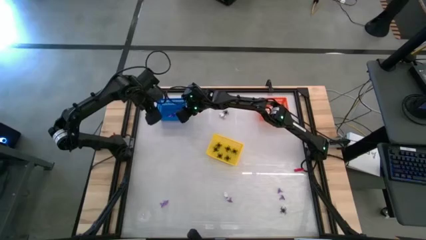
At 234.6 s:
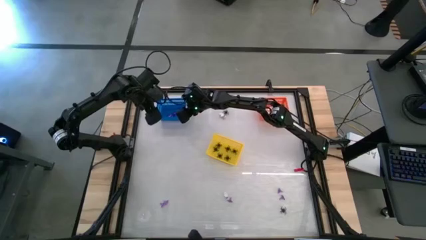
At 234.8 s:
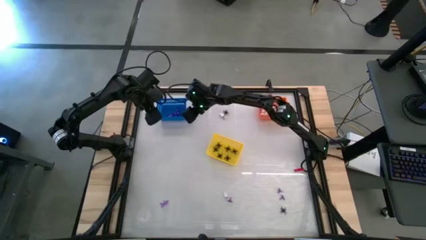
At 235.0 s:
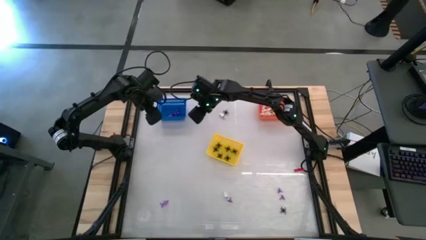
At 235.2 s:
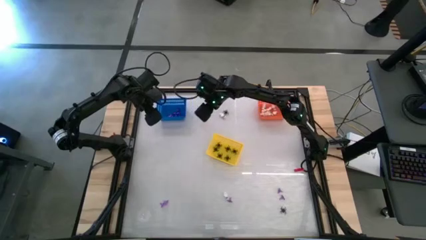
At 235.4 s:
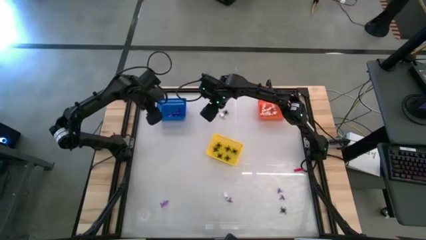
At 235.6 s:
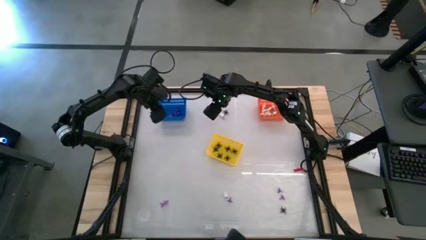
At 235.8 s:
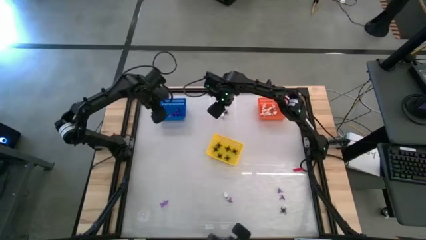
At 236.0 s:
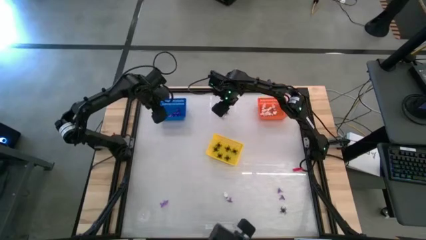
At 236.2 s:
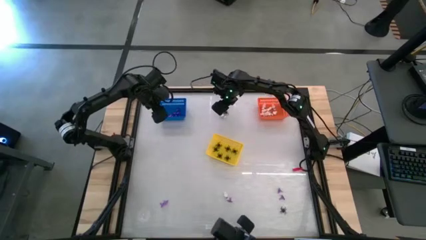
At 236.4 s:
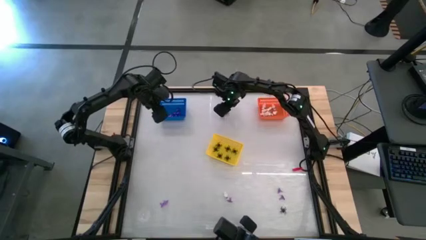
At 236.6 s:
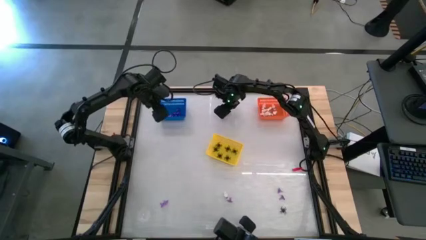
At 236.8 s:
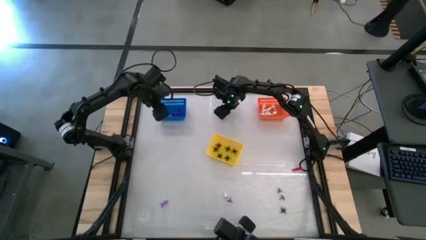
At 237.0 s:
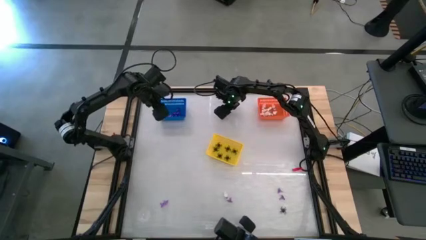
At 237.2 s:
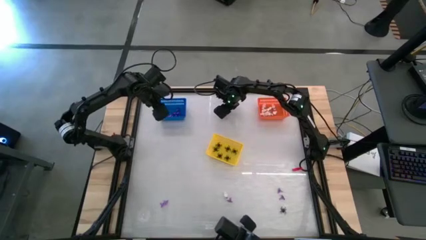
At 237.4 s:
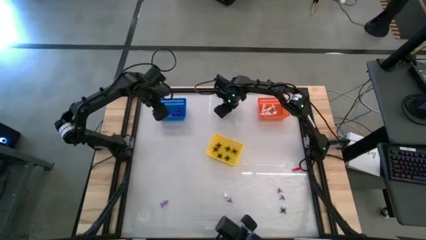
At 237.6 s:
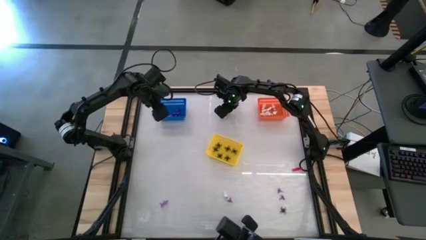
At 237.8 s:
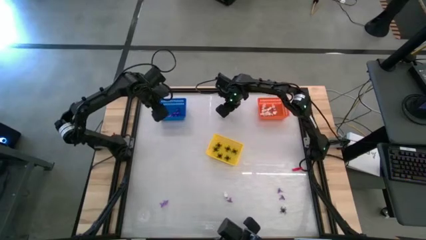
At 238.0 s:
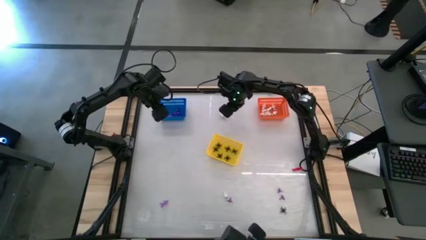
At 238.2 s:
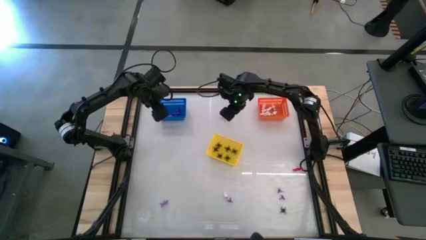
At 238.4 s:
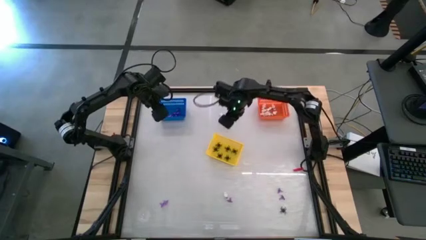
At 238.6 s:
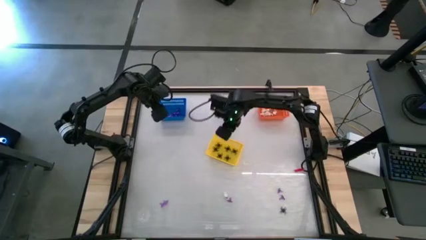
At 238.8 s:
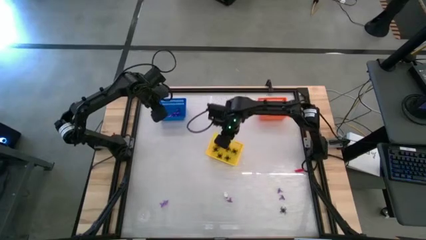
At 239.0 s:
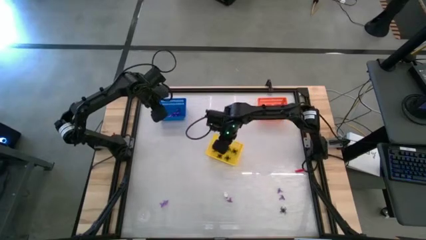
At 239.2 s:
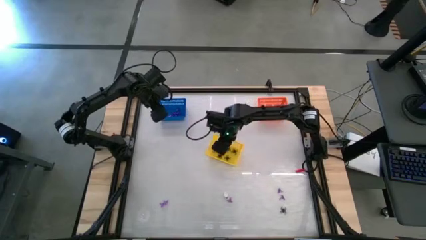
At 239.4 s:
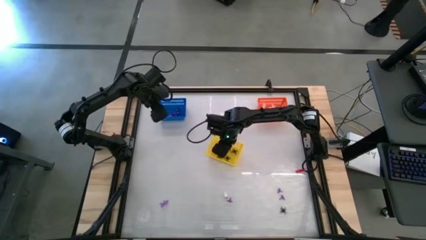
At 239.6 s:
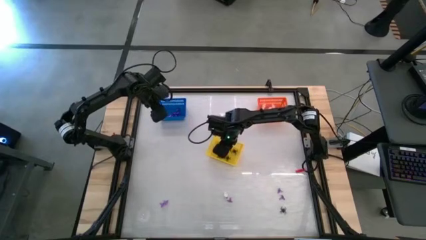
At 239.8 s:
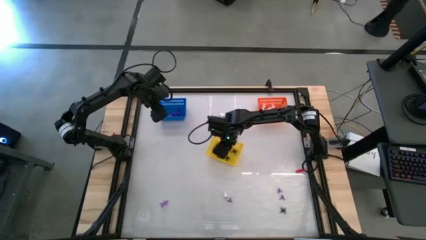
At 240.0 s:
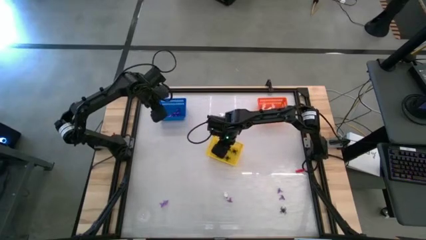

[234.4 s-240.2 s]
Task: Sort Halloween decoration
Put the black spider toy into the yellow bin

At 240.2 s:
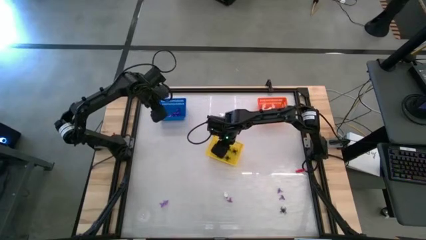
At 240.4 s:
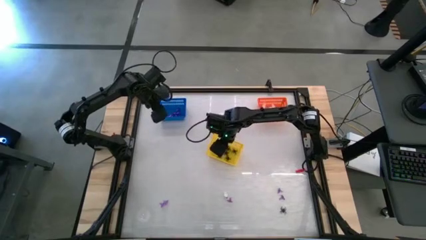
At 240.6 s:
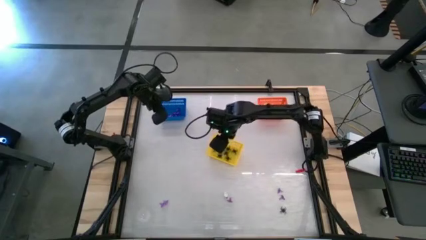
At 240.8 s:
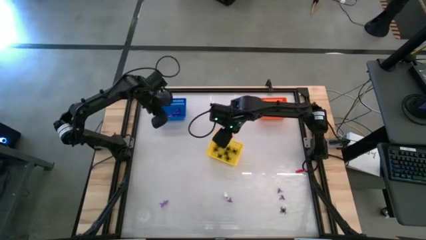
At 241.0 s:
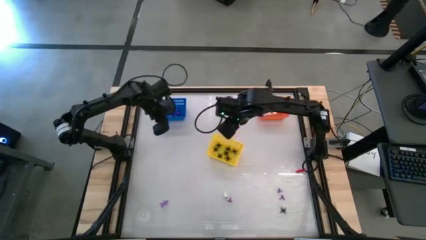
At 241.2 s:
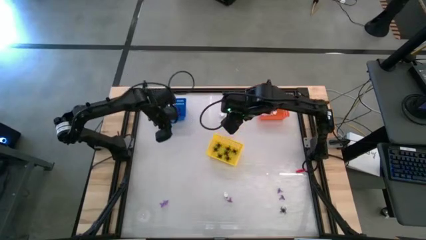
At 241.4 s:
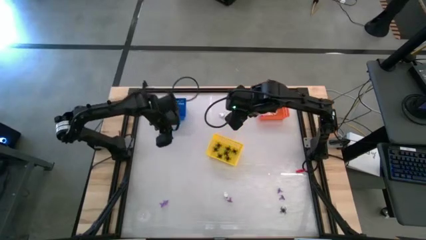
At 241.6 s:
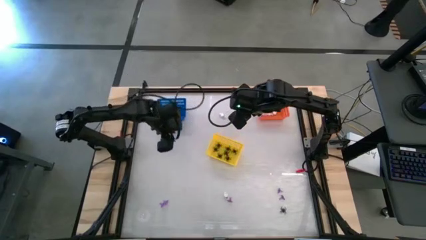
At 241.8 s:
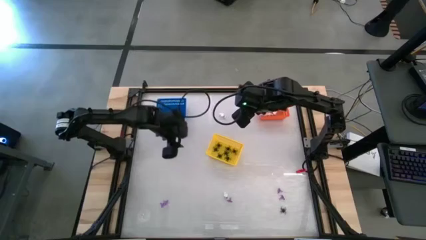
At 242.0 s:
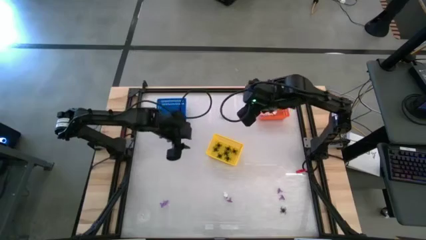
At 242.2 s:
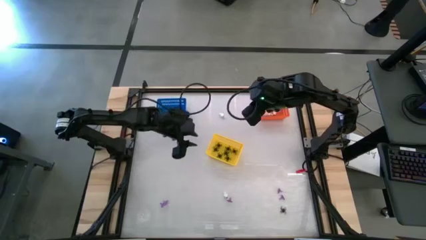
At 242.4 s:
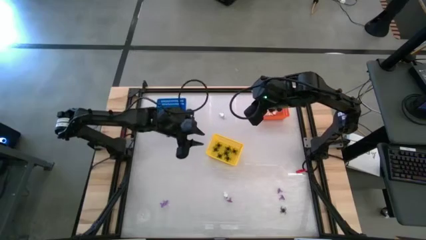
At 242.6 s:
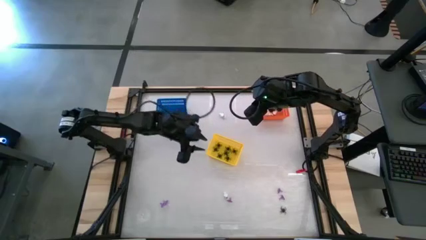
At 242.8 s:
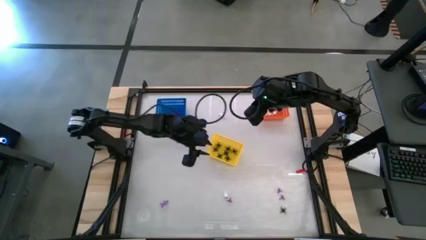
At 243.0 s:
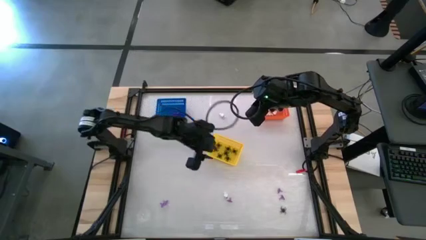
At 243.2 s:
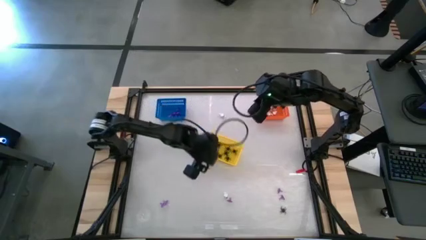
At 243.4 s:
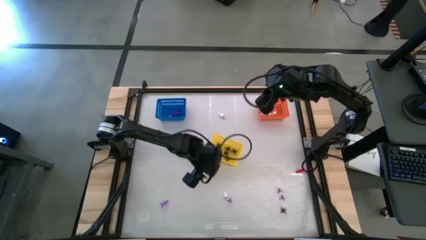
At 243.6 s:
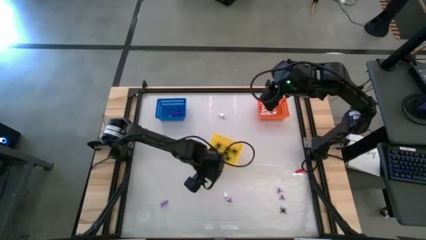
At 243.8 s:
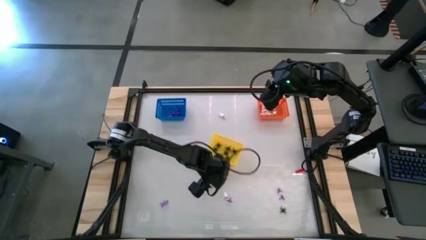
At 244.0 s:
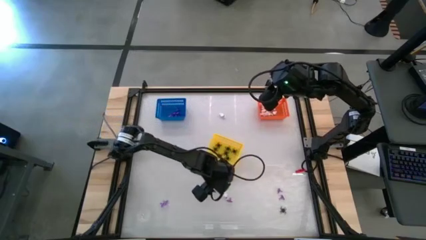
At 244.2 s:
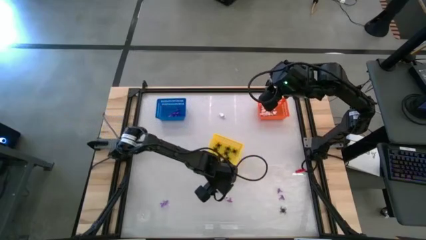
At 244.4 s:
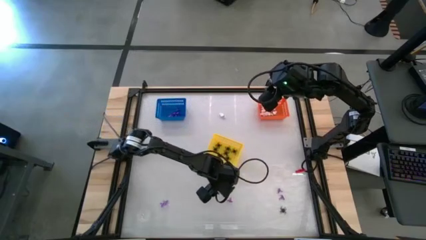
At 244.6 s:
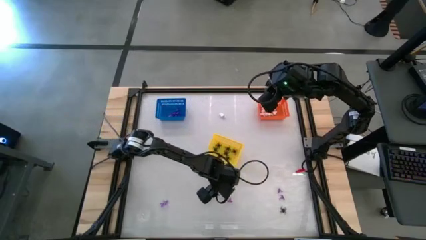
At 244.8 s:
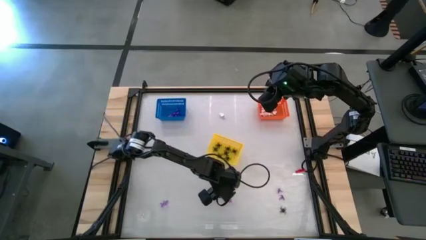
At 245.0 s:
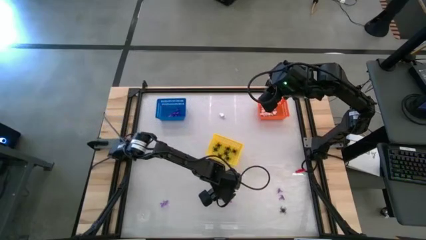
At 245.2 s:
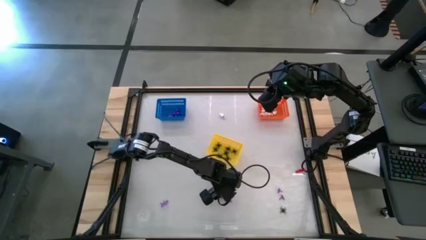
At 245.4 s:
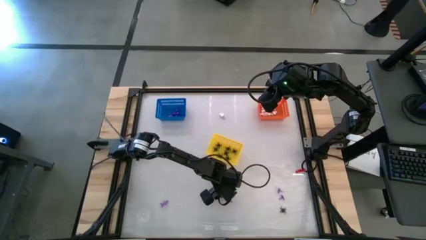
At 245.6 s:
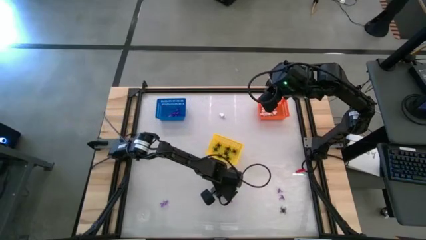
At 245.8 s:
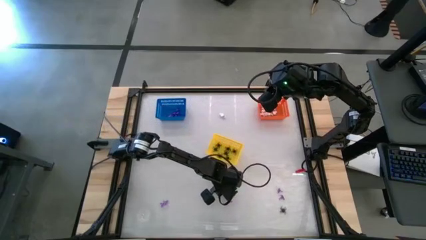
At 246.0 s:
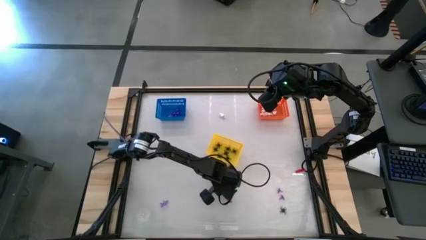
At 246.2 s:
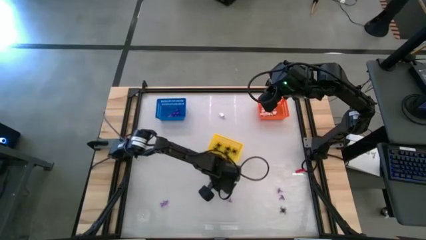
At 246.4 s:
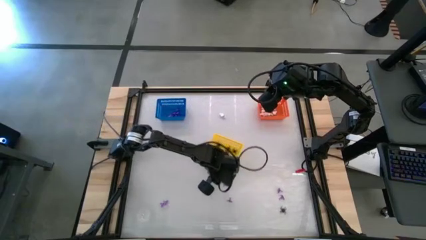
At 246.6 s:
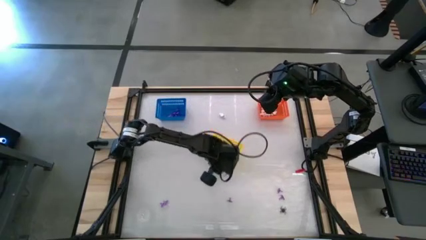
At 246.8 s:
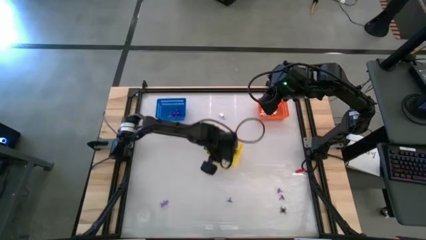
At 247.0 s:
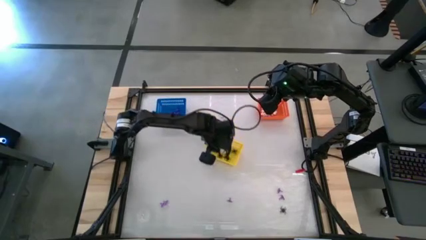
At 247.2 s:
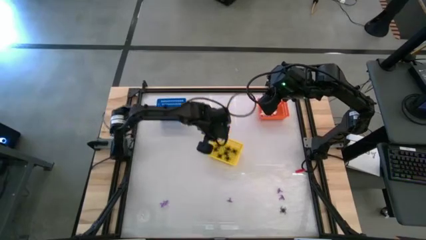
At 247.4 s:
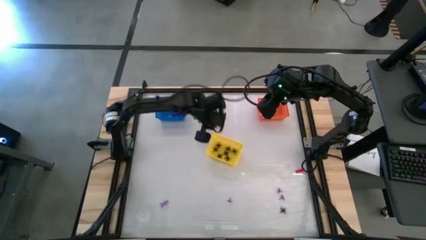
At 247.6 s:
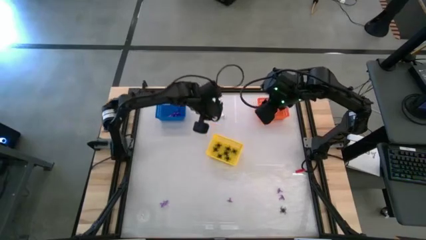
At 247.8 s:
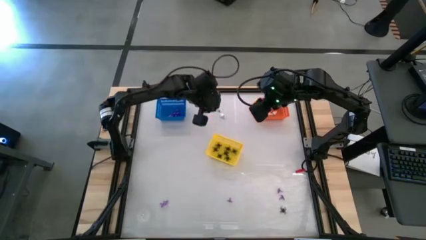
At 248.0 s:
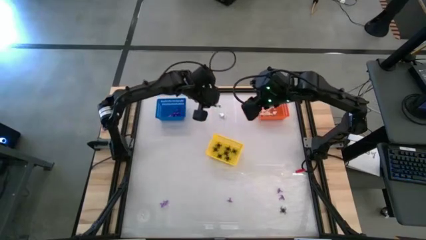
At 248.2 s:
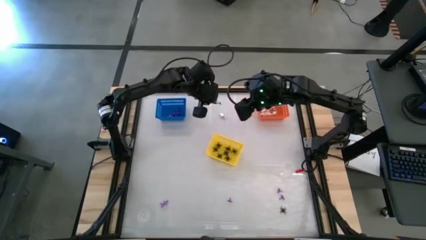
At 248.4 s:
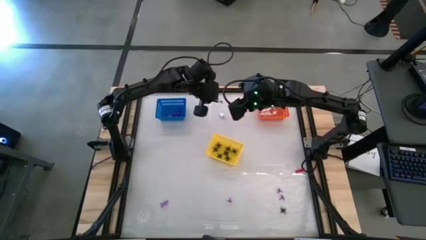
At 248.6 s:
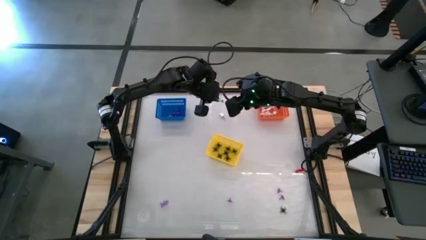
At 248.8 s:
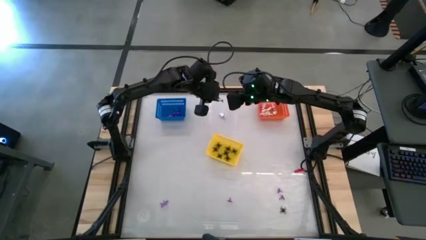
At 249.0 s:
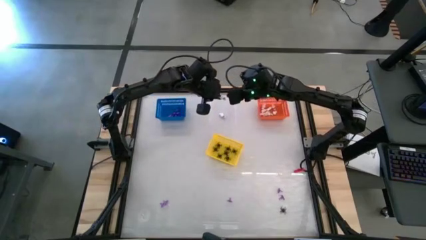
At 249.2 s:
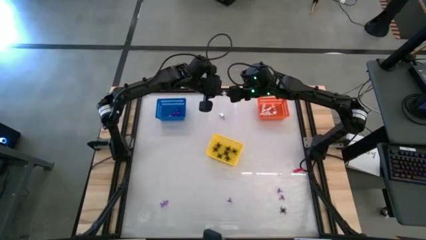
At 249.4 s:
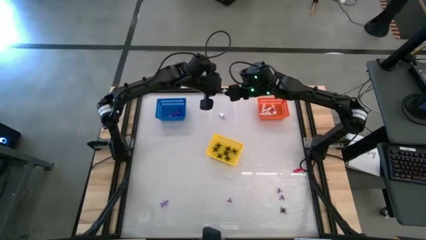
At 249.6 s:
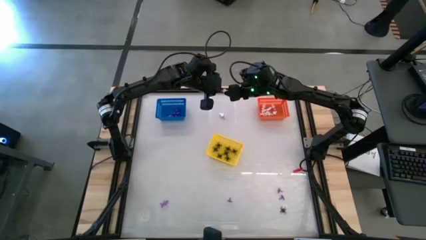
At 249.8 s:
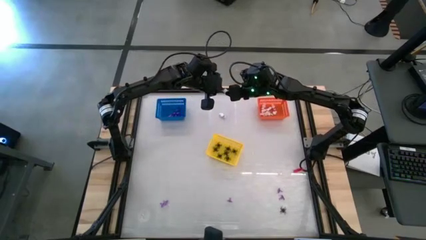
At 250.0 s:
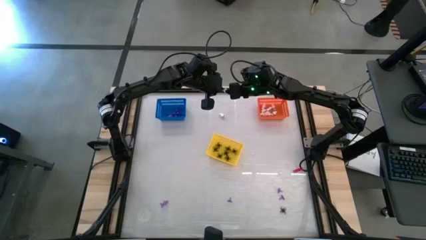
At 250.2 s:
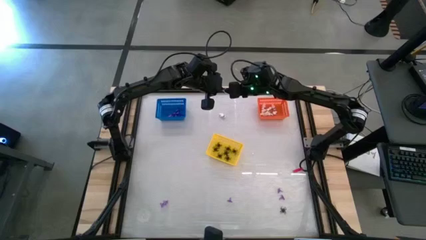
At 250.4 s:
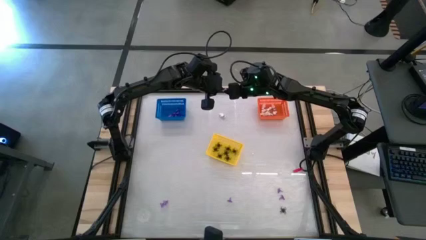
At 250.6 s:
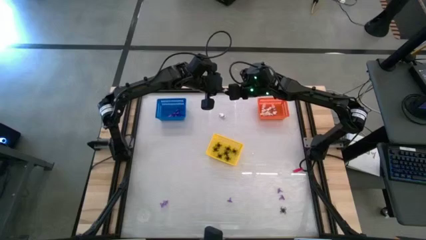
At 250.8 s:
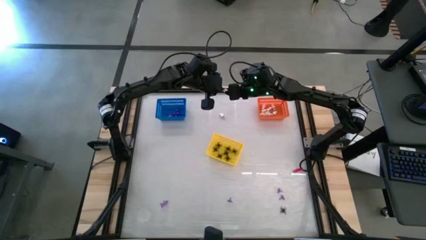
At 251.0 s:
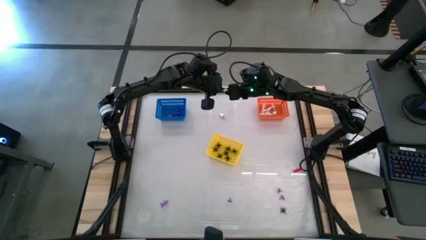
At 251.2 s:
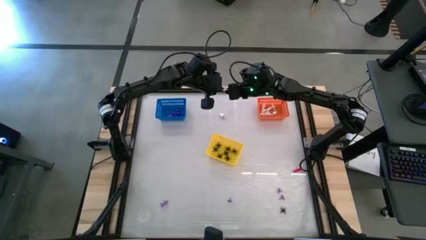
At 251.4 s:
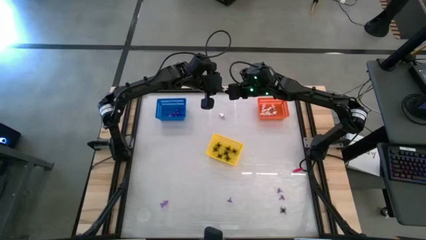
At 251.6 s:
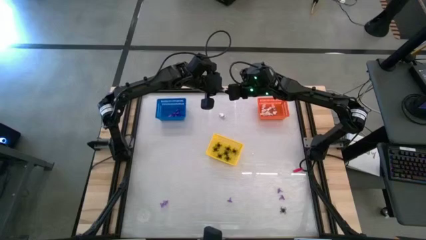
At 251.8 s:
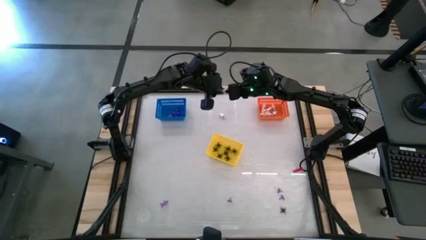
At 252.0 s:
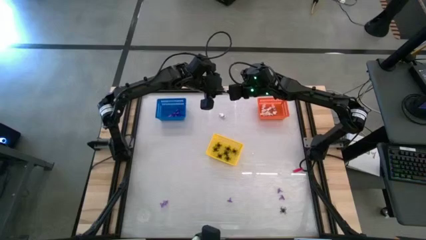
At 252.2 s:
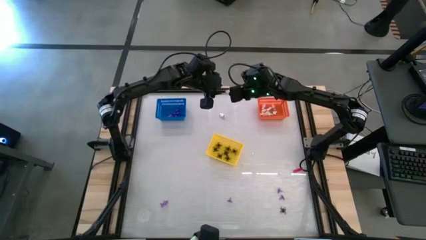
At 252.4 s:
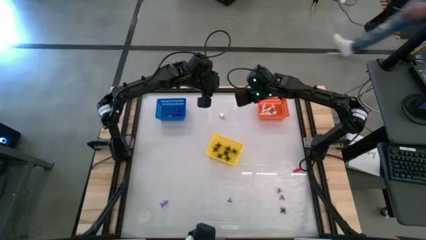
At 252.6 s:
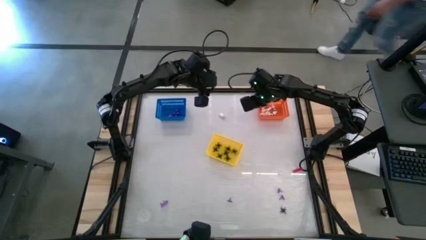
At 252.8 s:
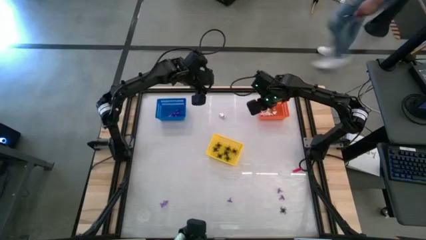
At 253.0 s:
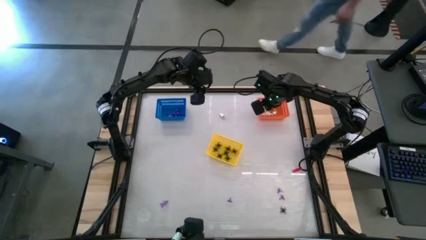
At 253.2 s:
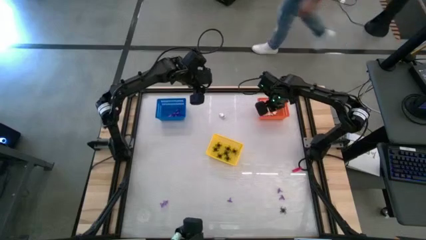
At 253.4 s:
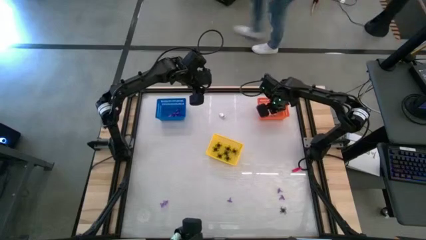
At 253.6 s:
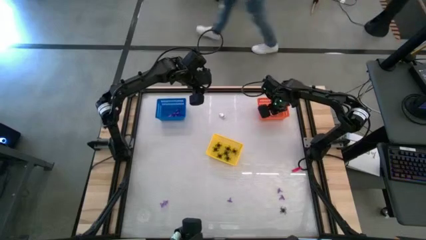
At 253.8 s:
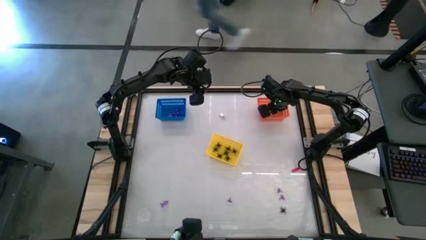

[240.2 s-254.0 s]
Put the white skeleton toy into the orange bin
